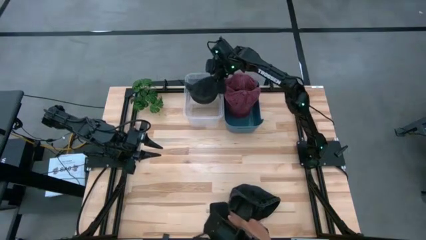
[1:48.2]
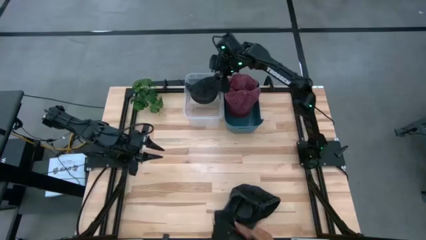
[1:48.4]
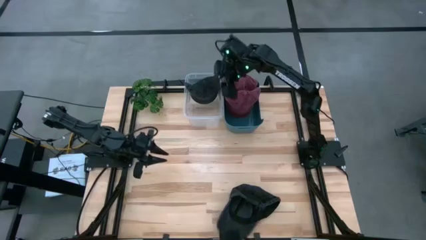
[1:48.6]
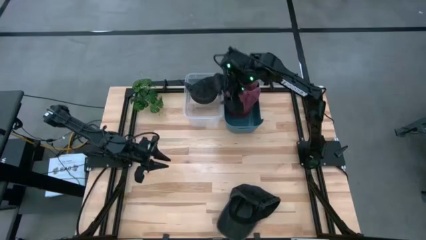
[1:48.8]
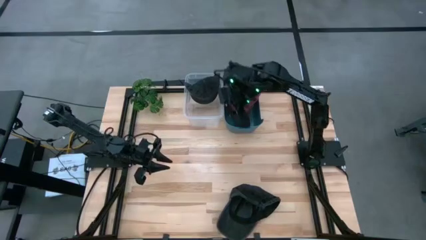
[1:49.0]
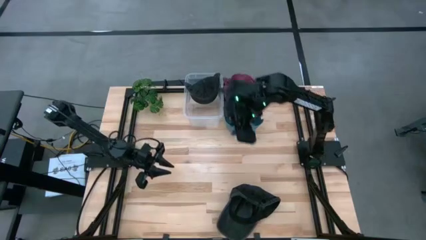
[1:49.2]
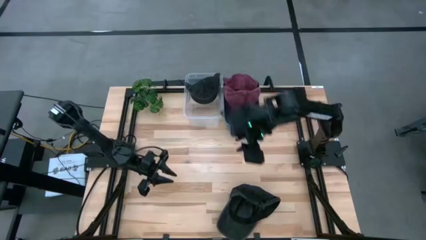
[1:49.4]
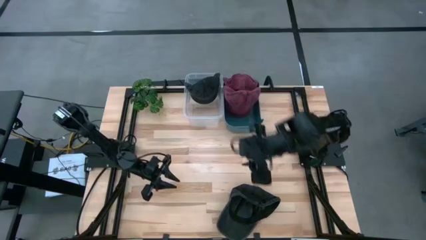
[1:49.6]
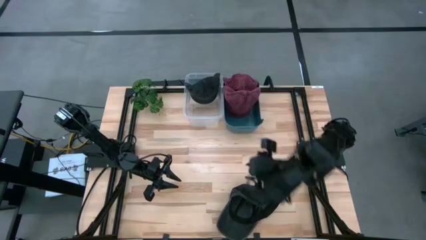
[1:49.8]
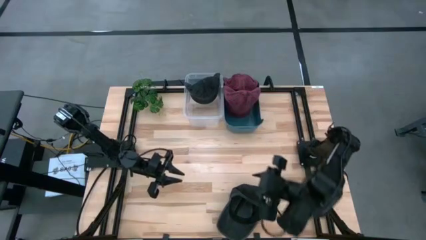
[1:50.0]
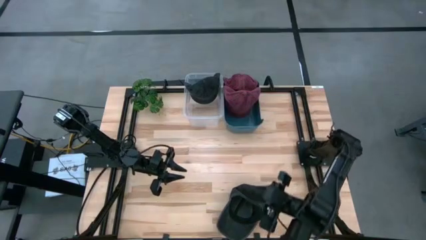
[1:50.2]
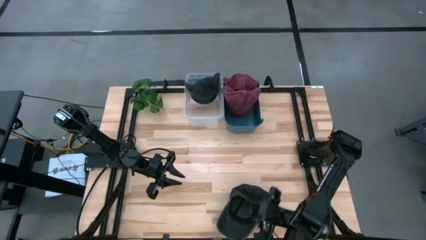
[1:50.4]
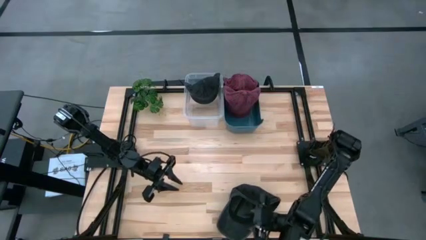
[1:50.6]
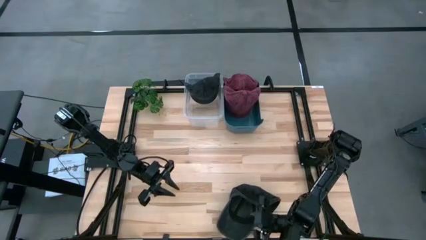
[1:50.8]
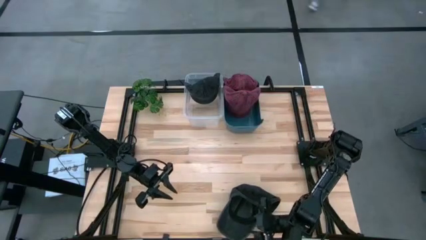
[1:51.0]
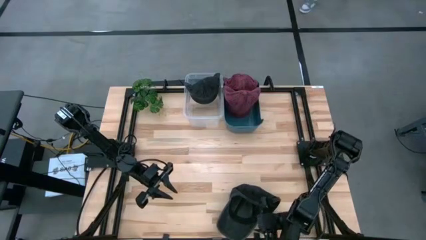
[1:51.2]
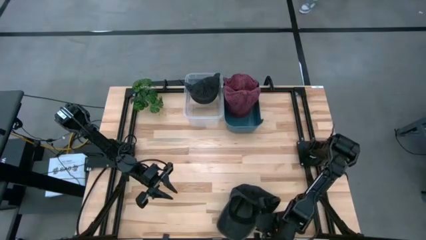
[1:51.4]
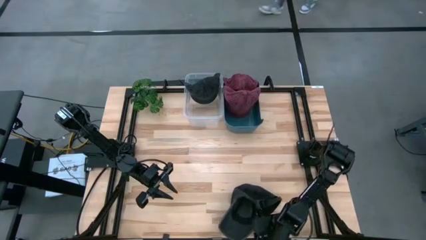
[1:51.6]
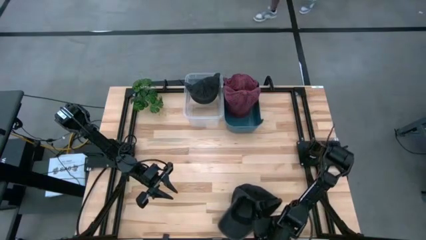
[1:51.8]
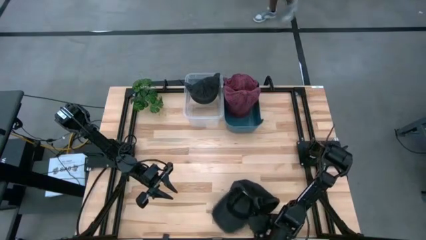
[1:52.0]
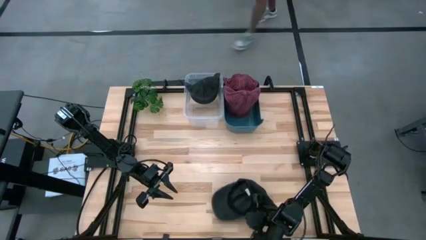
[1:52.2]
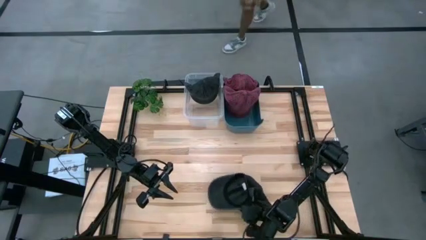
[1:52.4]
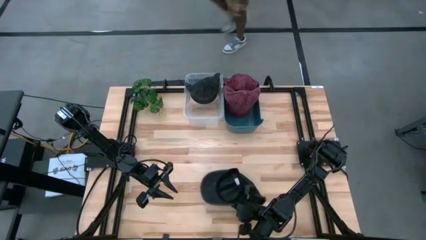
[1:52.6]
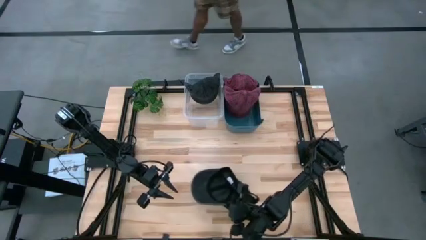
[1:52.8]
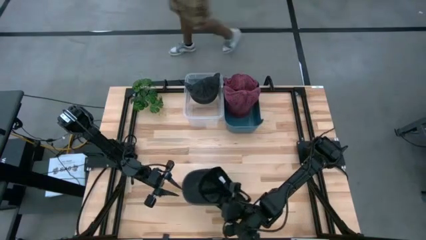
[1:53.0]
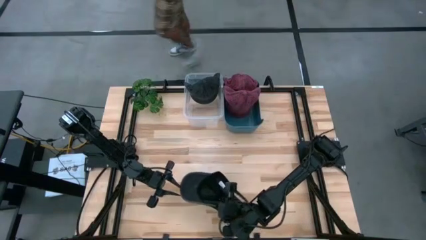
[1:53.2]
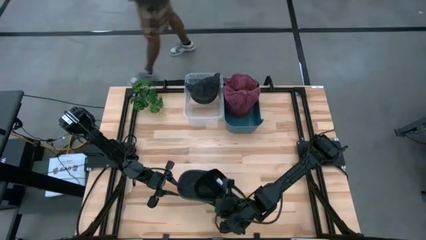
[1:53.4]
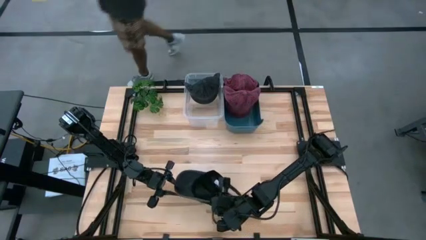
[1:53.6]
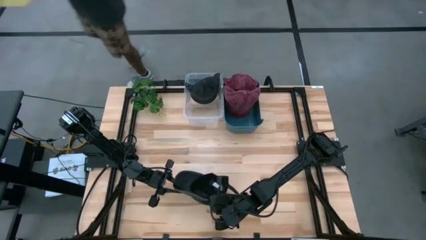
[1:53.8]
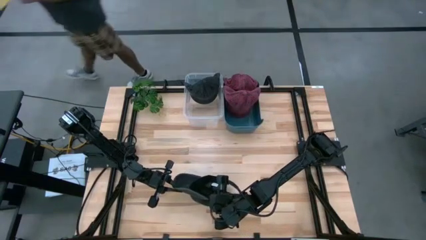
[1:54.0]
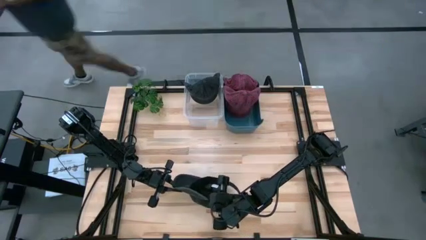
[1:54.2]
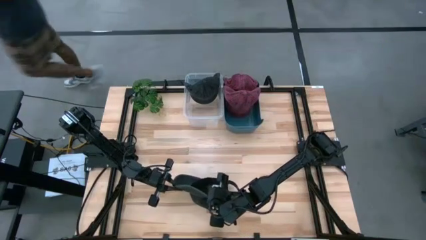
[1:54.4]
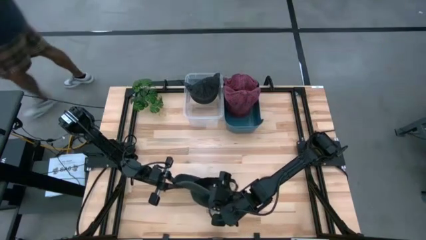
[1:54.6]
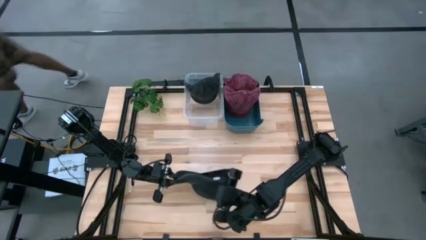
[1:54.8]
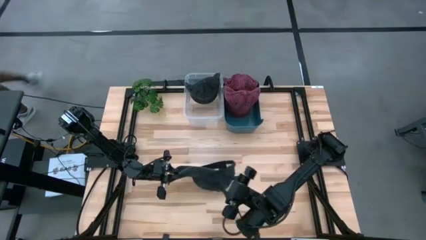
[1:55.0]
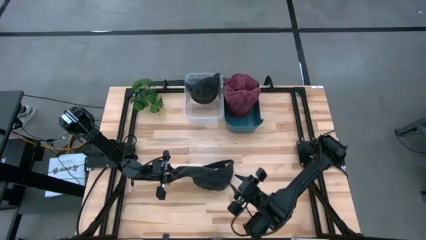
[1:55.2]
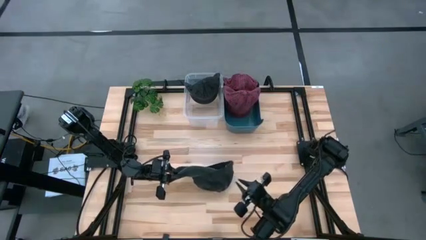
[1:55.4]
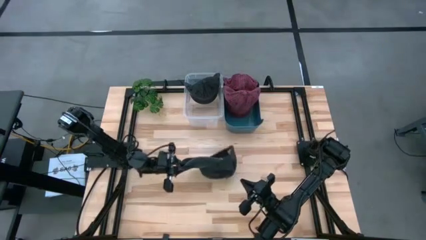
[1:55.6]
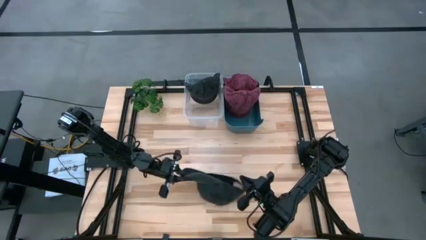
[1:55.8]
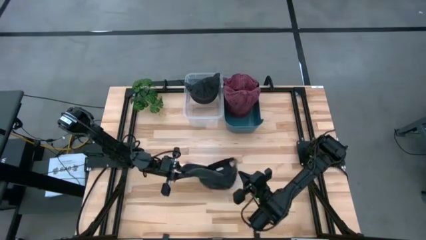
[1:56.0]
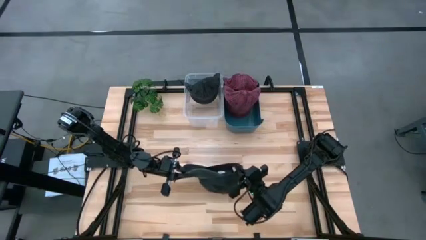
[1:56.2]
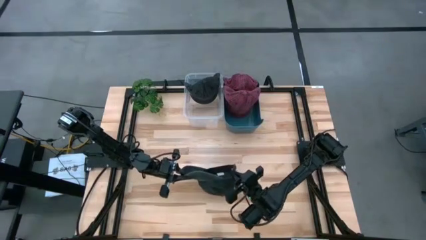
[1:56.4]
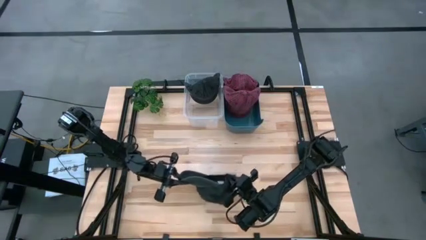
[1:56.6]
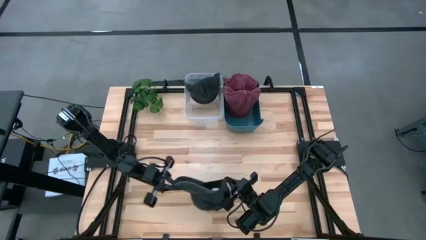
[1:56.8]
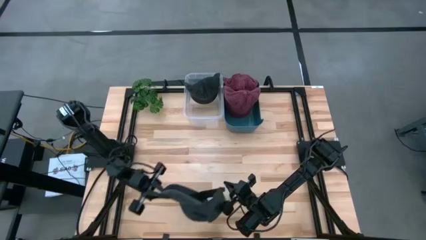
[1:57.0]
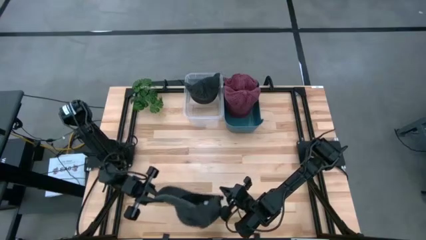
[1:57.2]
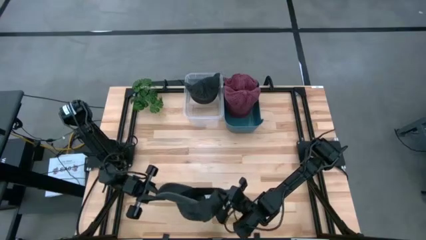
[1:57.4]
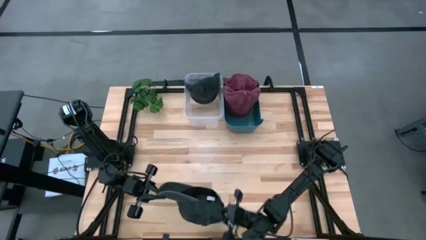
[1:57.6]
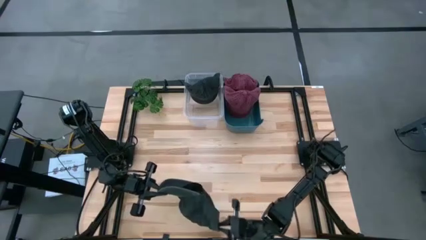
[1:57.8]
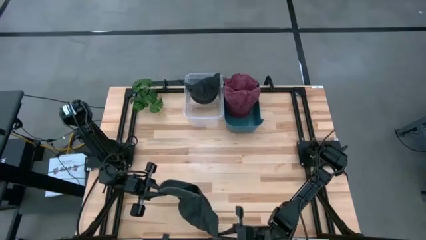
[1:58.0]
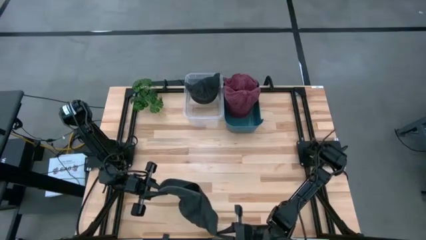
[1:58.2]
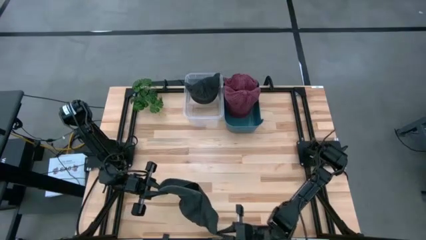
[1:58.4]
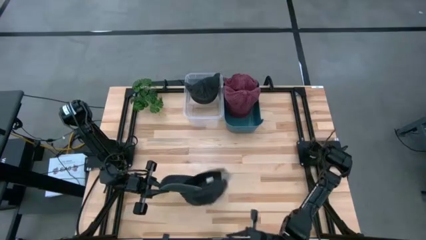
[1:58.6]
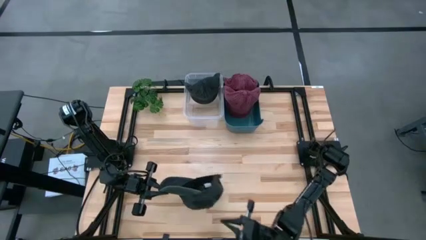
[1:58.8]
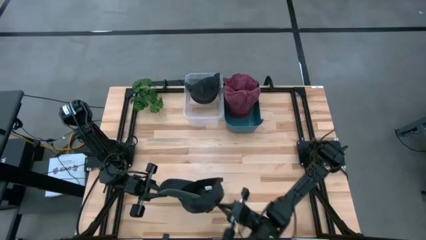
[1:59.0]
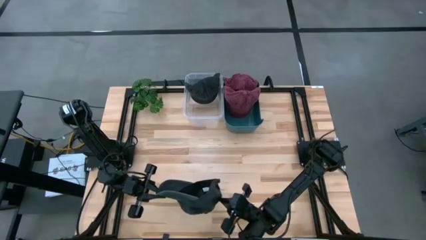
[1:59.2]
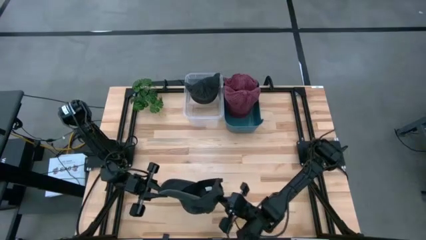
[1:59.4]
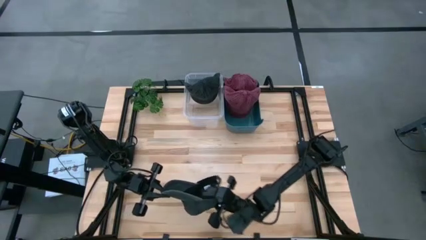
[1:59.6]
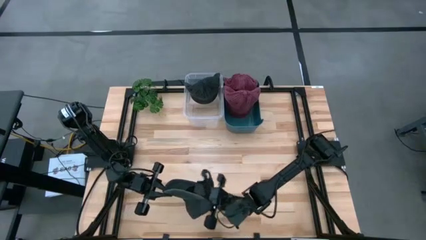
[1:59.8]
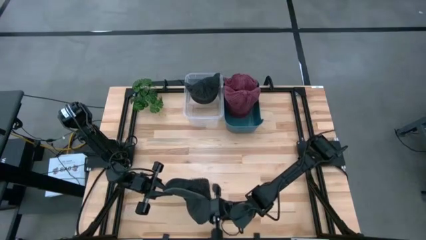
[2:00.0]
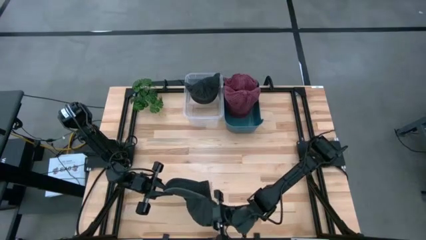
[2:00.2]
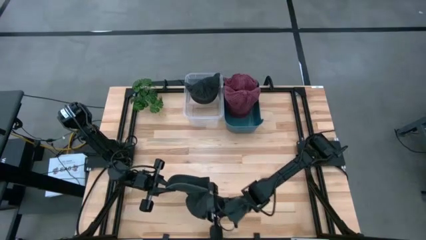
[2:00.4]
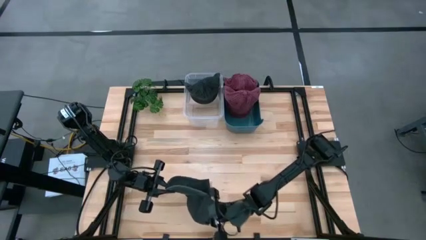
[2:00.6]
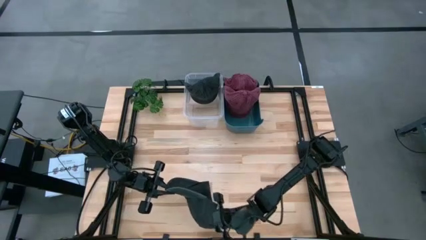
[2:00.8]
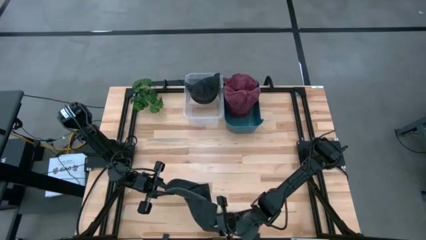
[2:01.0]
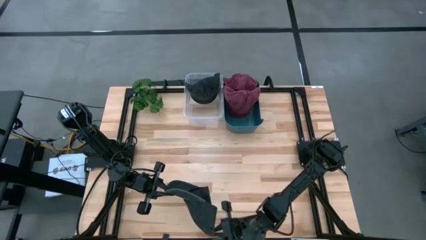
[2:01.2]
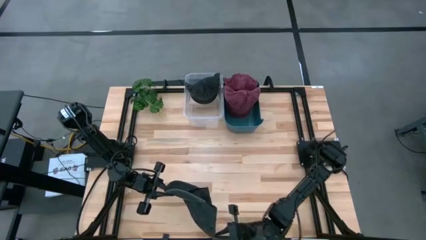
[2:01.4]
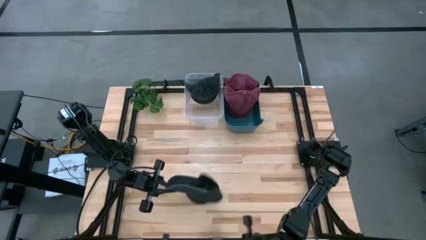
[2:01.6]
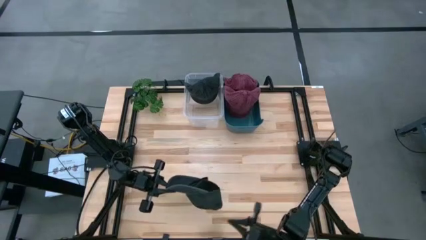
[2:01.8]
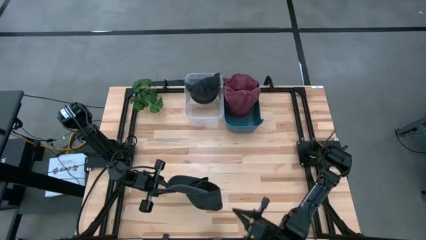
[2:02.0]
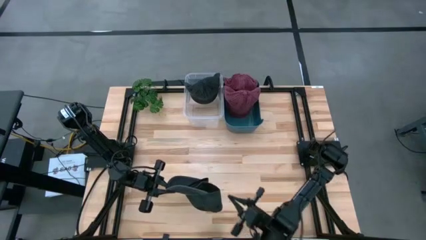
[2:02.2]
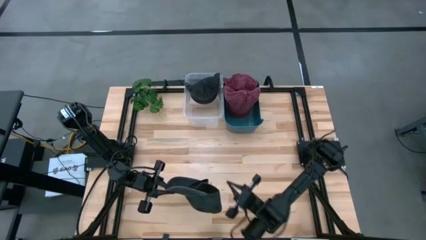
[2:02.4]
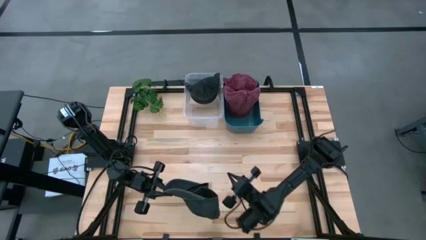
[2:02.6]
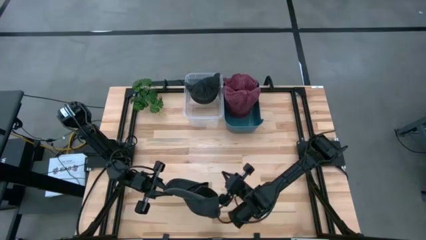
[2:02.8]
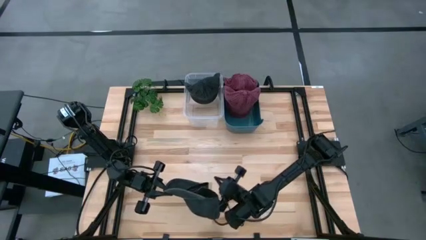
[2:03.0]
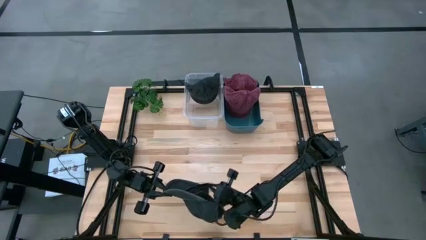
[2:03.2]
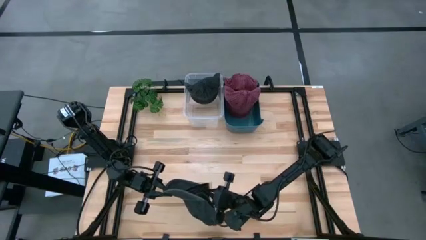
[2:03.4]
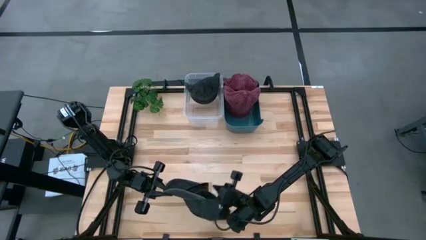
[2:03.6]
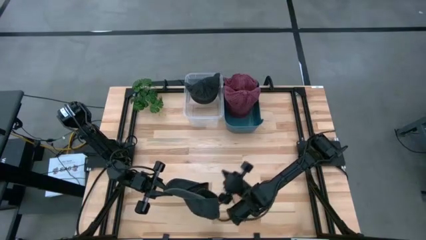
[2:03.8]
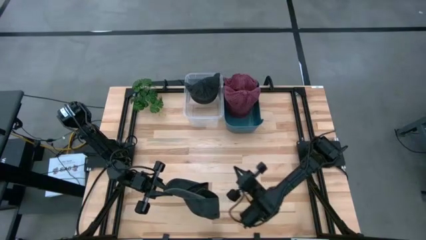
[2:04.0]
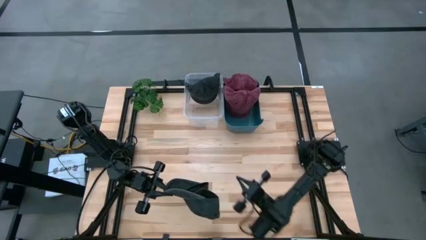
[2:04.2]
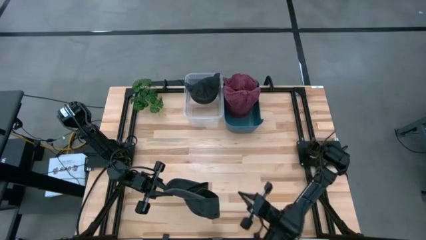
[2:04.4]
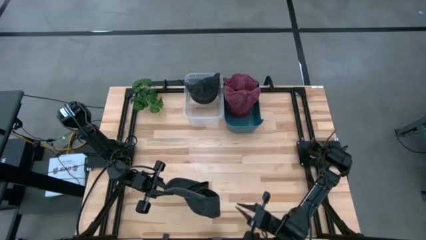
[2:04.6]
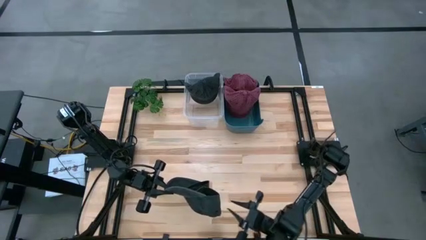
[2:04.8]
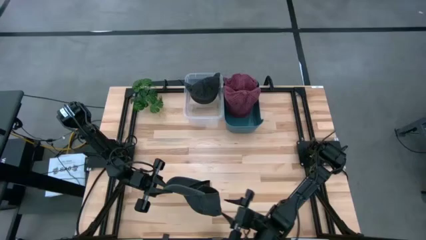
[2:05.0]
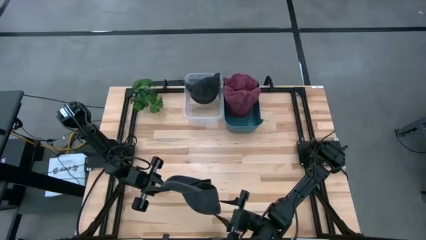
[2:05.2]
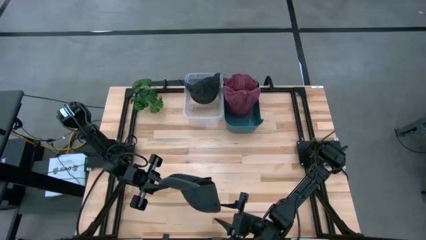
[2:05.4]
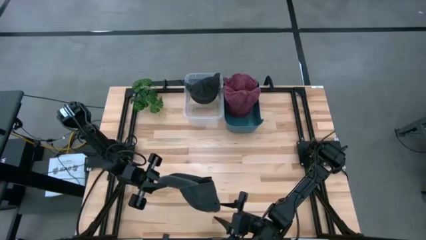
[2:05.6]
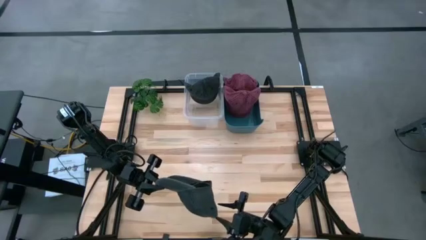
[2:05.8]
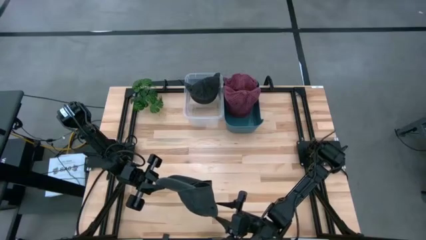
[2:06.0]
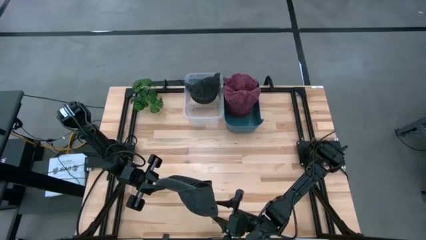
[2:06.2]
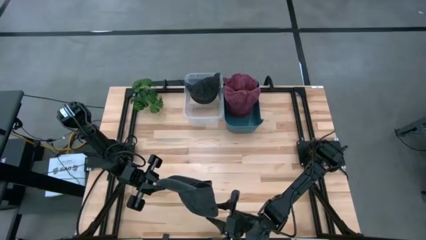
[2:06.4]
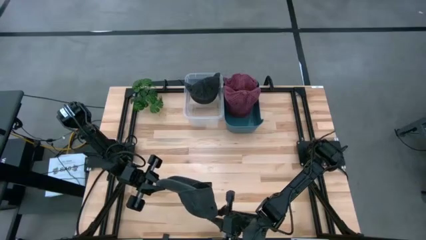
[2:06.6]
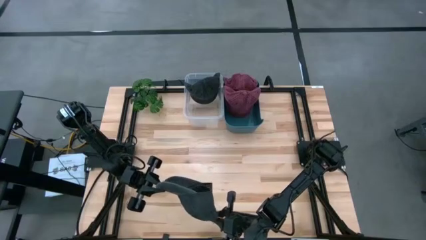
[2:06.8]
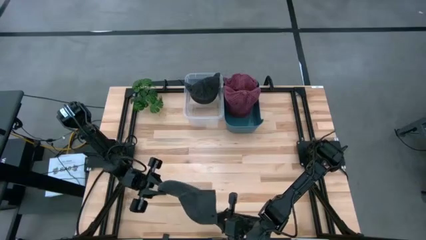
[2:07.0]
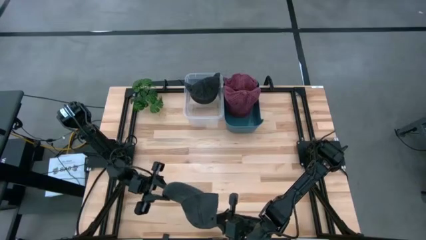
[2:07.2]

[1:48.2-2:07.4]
Task: Pick & Place hat
Put the black cap into the transparent bin
